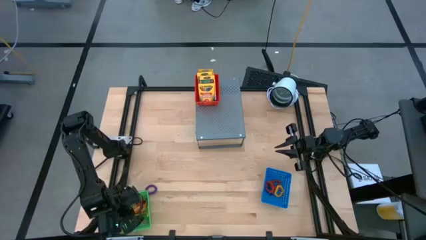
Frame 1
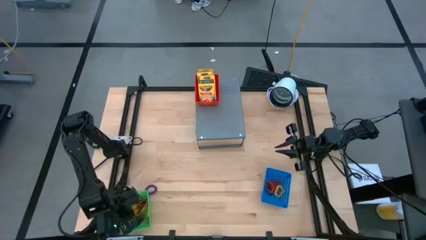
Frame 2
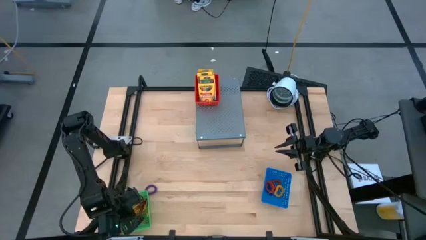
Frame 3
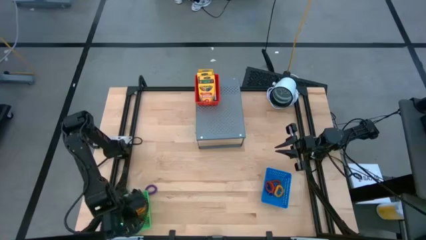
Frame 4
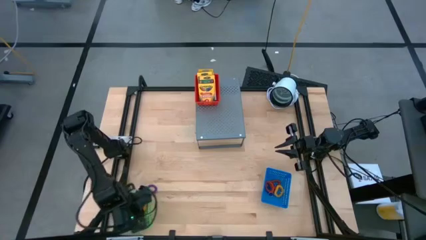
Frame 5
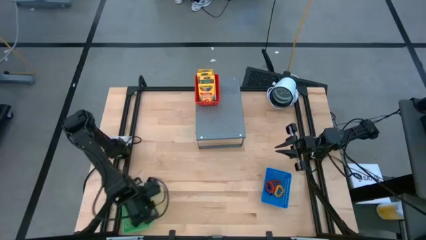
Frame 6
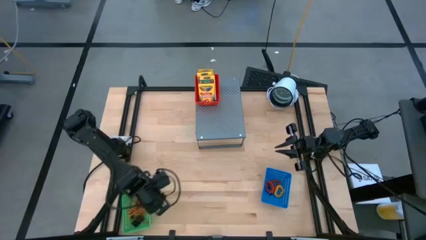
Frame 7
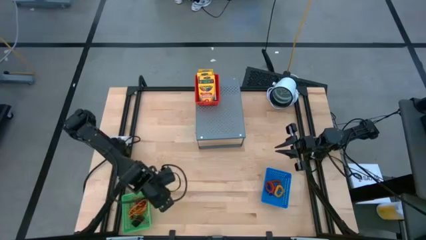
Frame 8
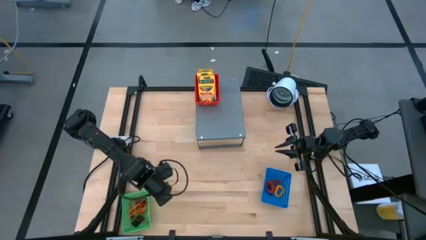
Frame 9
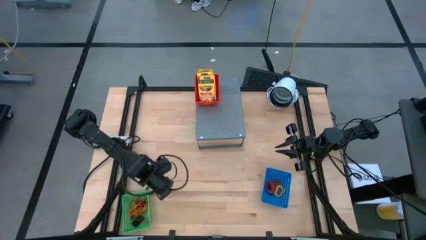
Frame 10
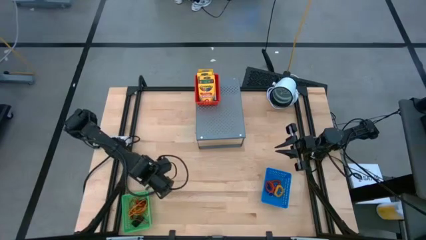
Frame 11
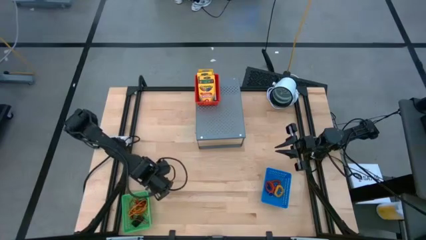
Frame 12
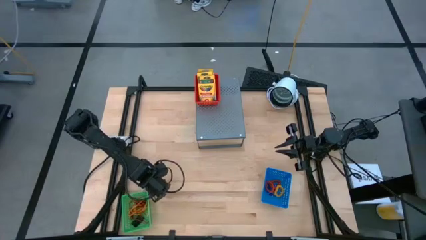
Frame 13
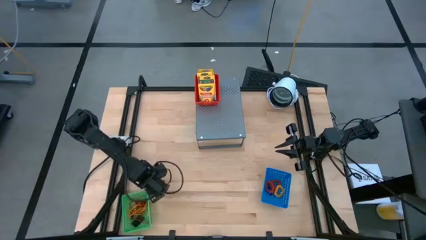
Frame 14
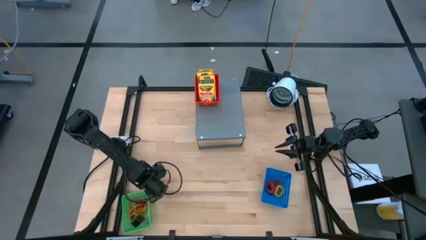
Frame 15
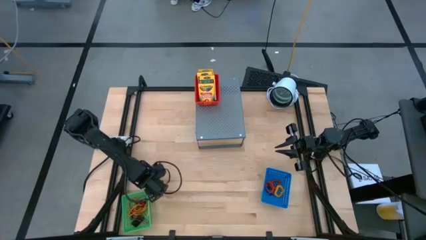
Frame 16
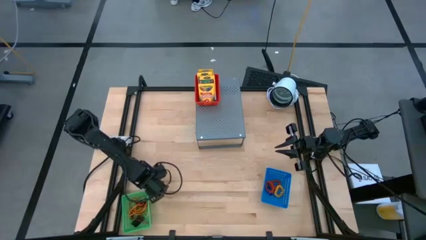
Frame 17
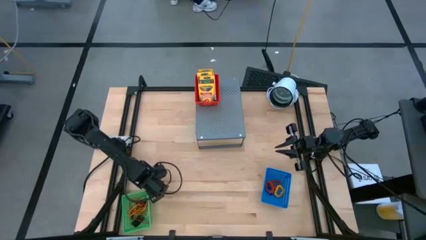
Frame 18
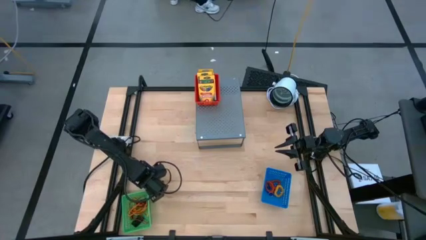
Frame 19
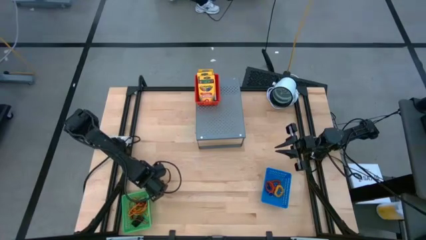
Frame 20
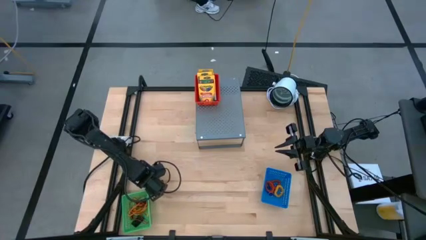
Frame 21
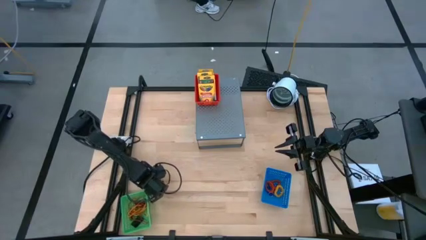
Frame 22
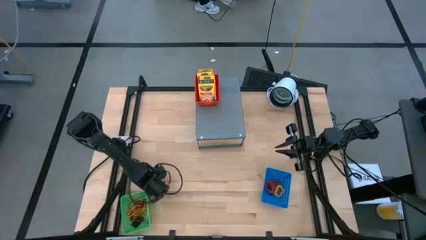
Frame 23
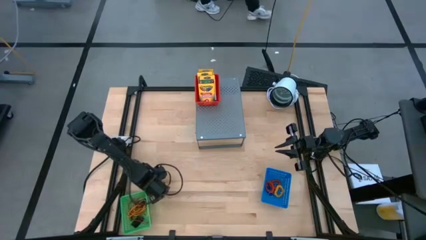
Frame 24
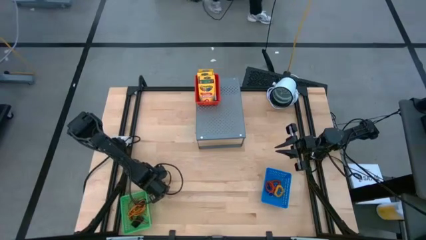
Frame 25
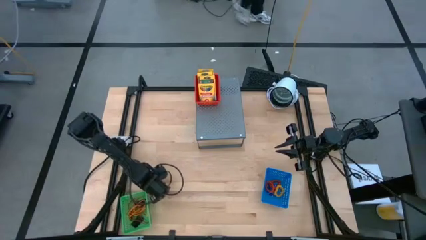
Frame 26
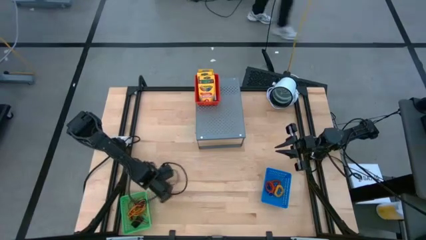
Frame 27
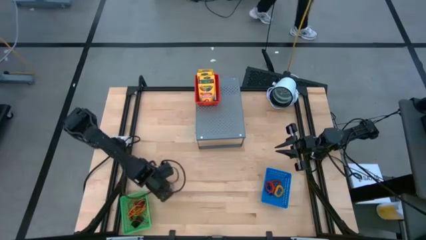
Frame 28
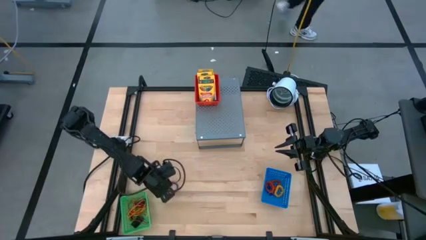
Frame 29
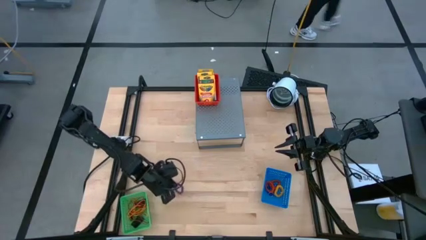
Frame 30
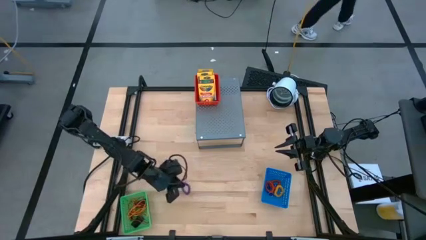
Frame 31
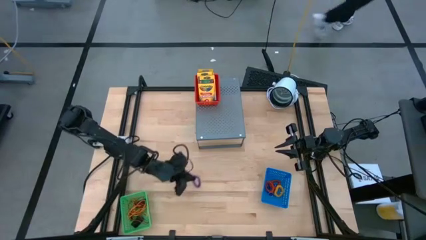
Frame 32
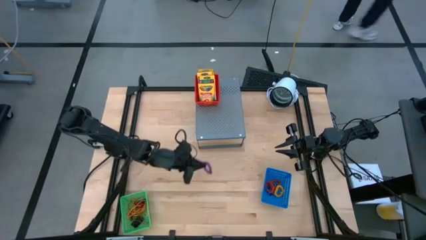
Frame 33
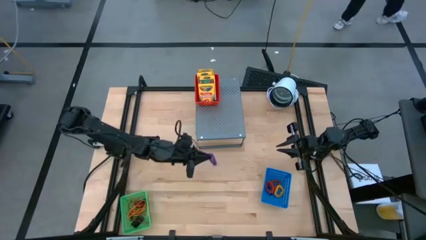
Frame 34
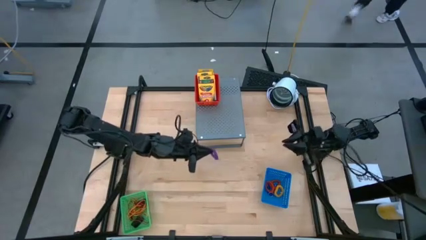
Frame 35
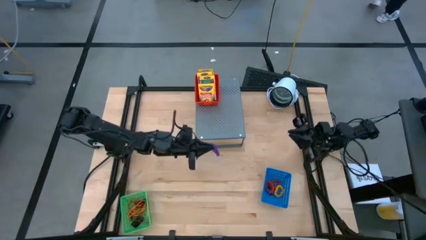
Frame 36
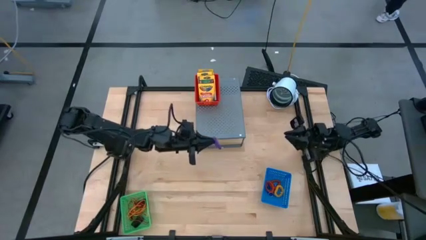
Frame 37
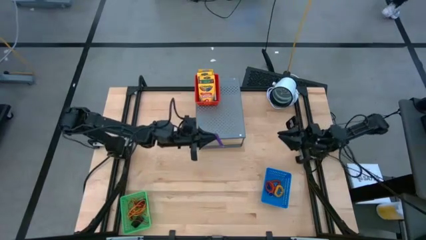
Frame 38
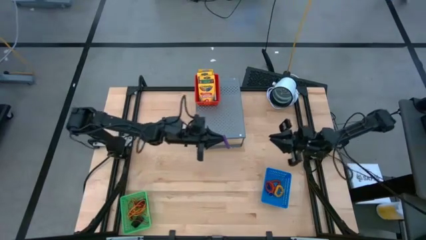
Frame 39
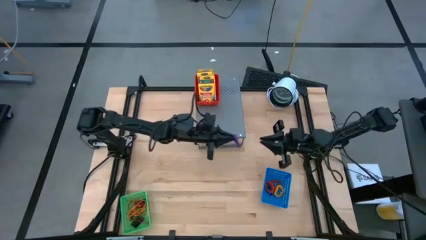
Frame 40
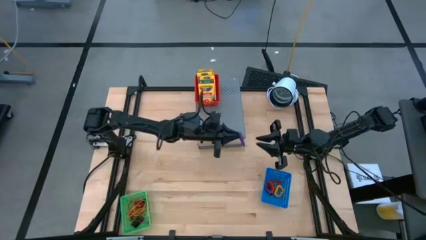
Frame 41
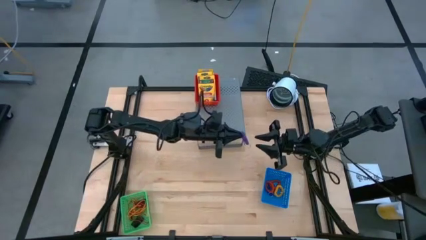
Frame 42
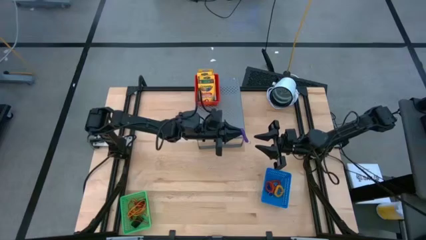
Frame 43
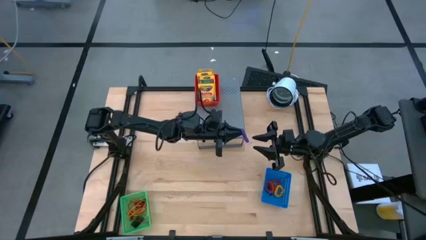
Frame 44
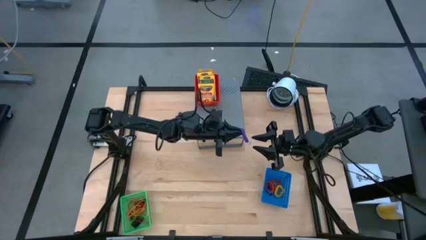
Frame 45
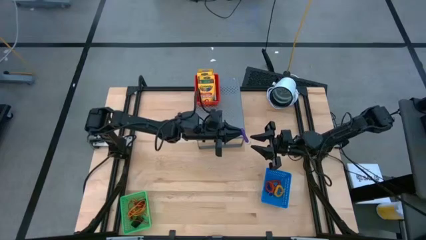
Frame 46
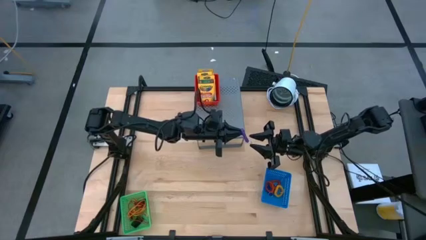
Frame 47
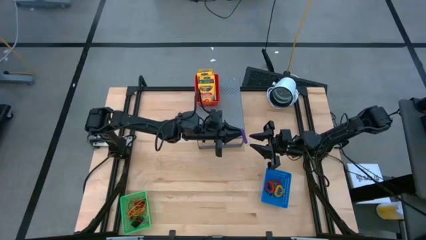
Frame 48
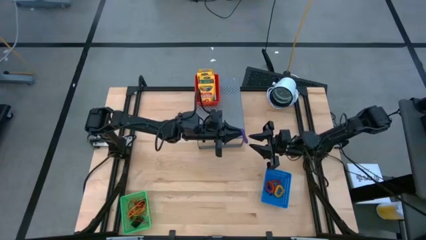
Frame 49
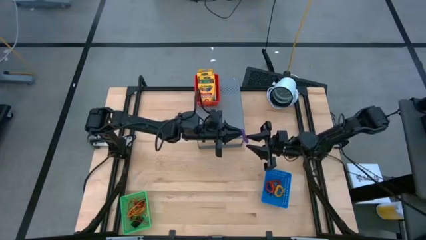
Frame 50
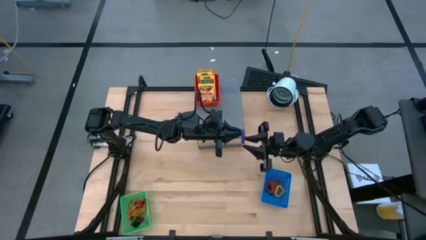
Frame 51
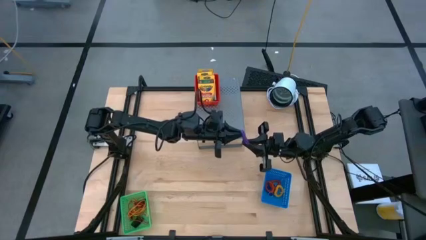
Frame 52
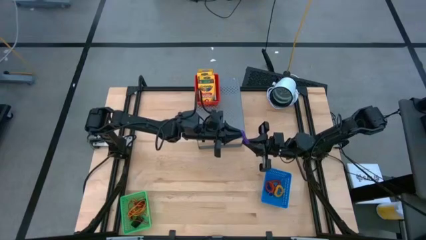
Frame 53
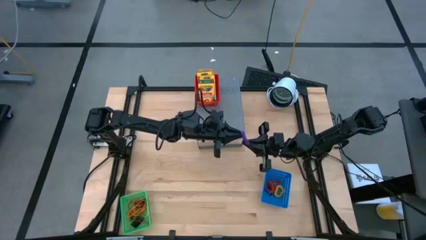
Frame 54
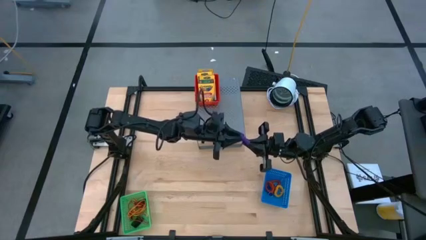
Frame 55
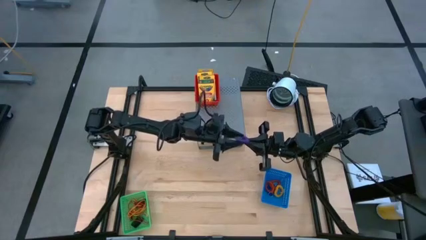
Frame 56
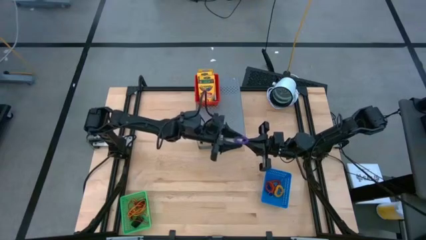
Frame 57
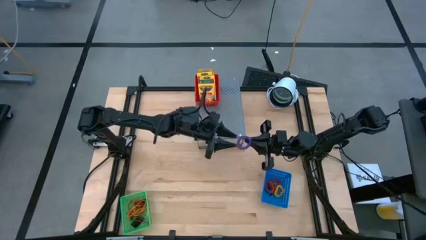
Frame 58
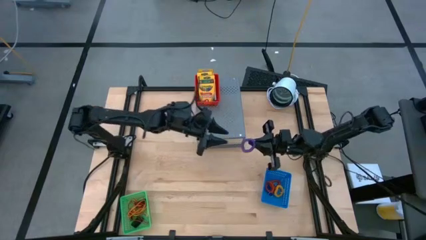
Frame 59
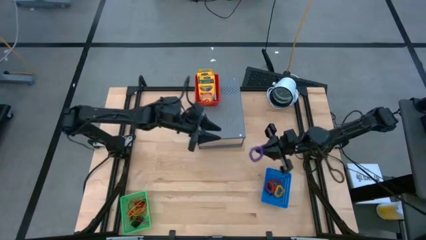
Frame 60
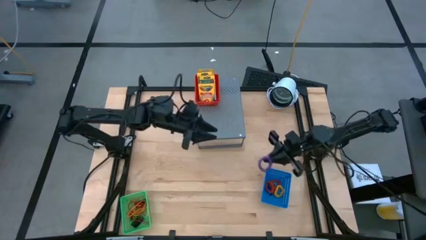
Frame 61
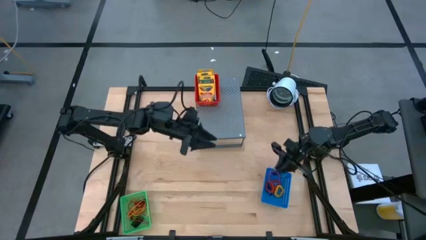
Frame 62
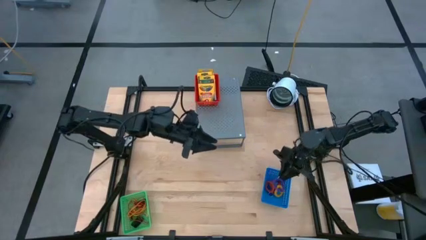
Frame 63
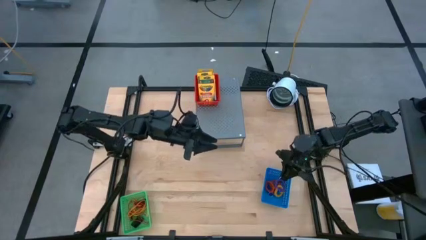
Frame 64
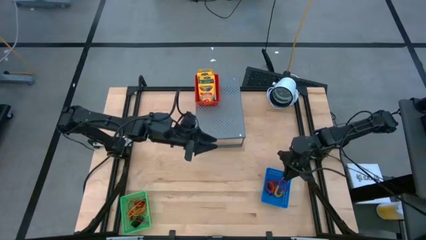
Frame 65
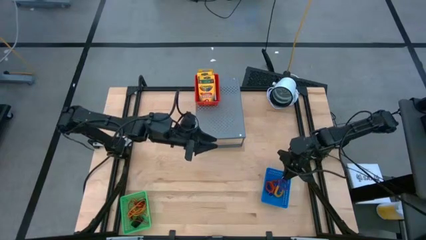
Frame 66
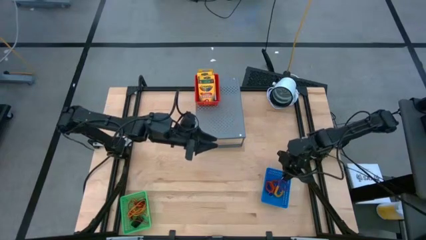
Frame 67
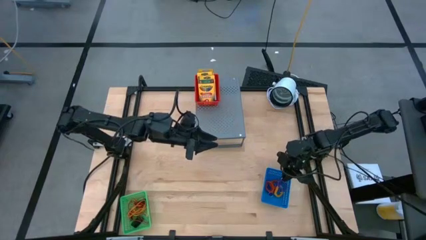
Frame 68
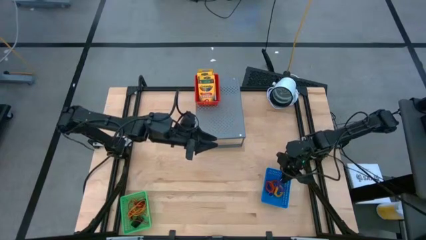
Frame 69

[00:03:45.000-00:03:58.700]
Task: Pick & Place Office Desk Supplies
Put the violet spring keychain into the blue bin

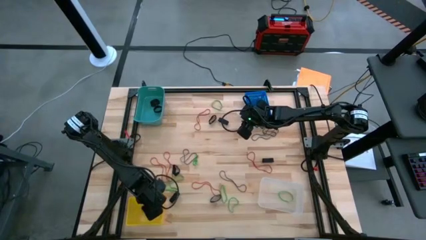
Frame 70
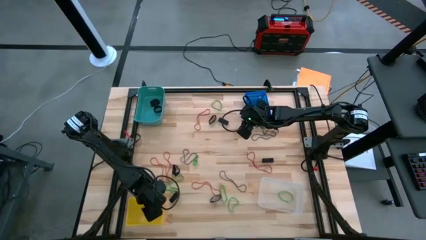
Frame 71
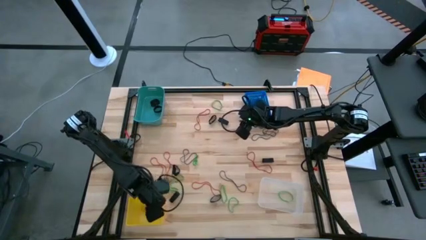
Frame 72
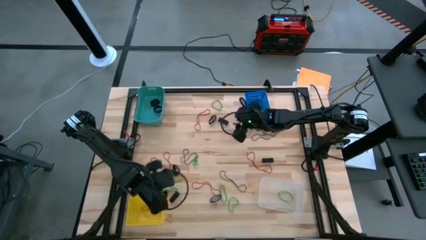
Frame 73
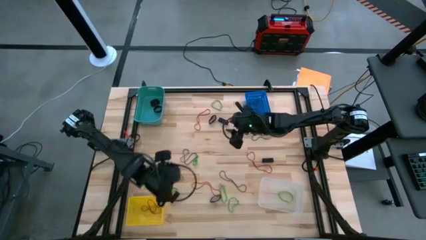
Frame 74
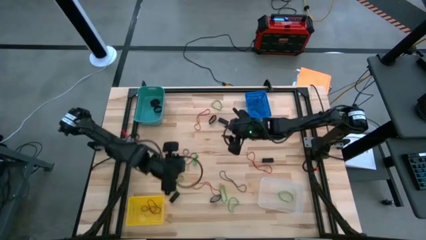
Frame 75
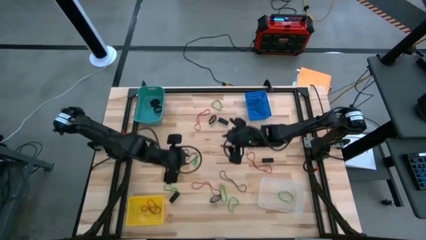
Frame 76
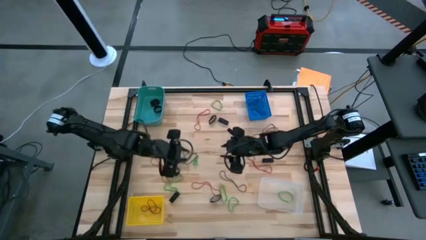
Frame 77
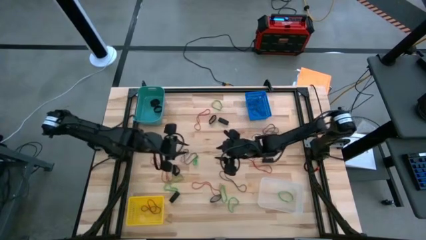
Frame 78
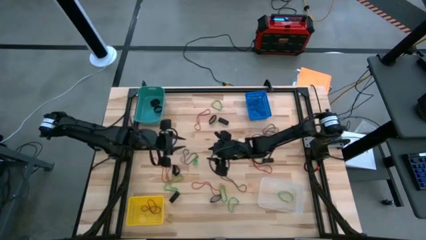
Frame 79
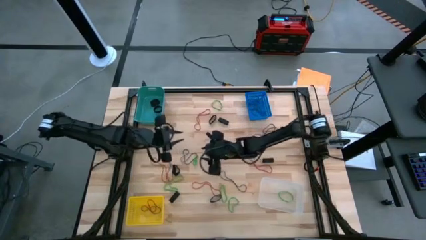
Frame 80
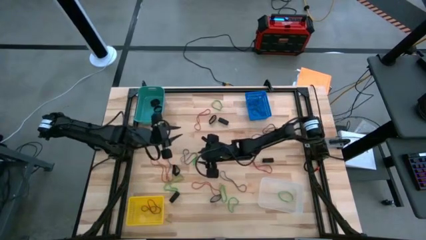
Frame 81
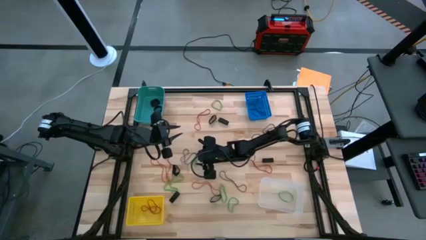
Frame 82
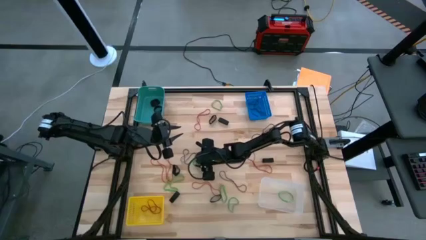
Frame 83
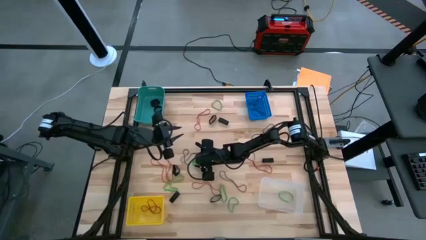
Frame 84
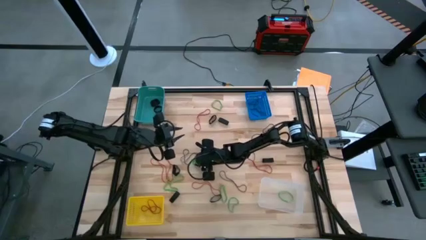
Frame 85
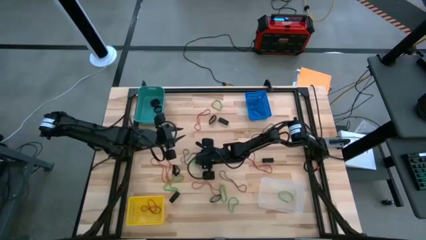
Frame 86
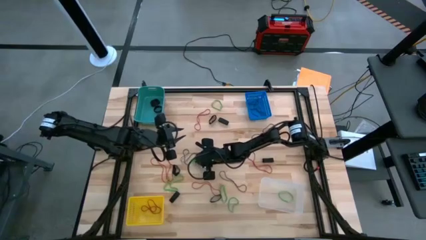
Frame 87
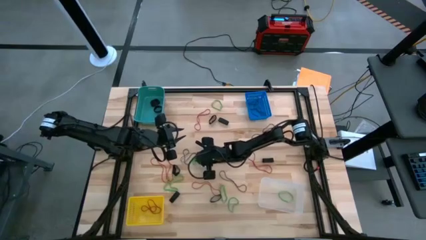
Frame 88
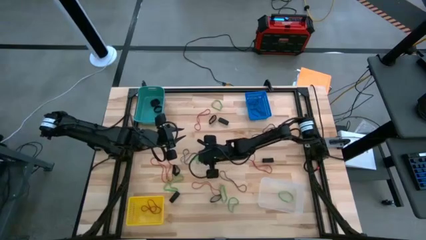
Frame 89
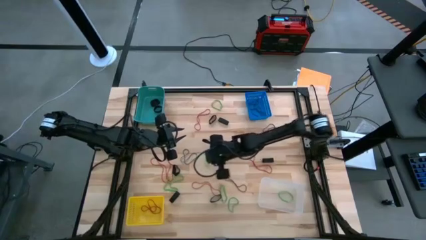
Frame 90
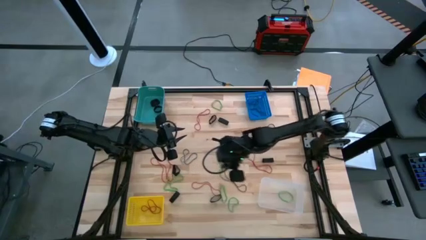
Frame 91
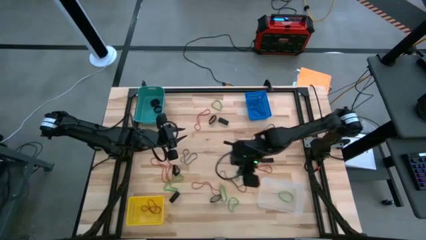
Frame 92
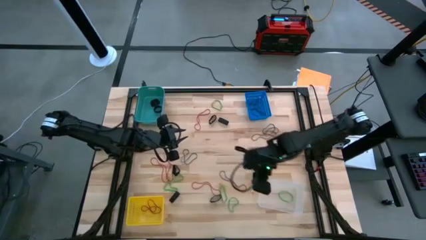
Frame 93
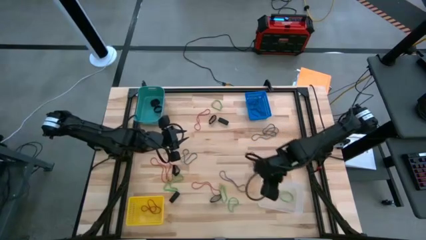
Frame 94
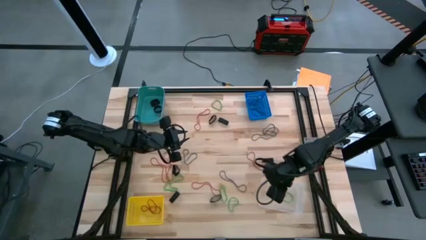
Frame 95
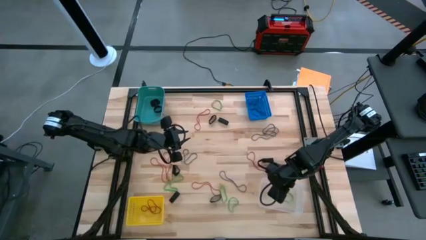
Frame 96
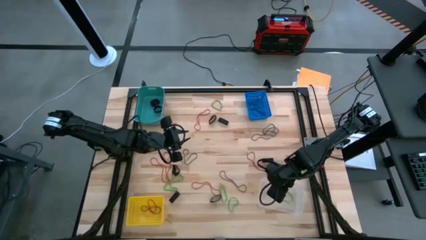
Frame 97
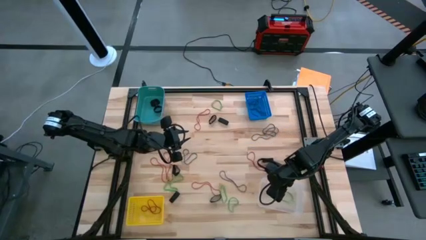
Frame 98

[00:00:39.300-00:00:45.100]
Task: Sort rubber bands into baskets
Put the green rubber band into the transparent bin
